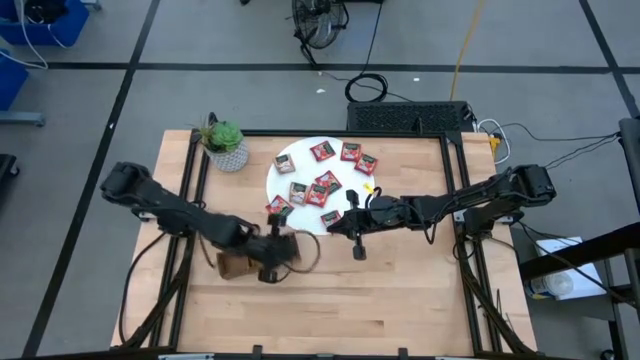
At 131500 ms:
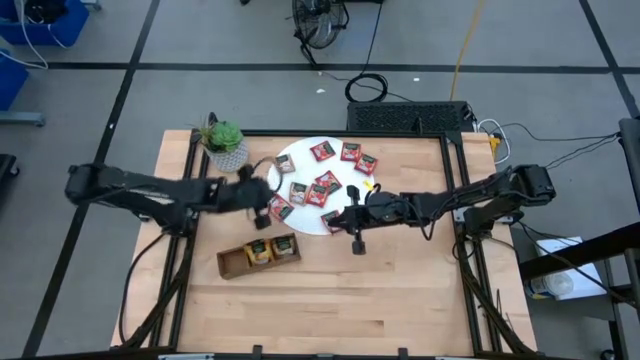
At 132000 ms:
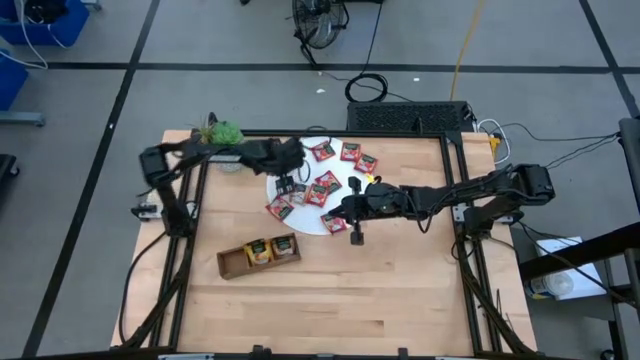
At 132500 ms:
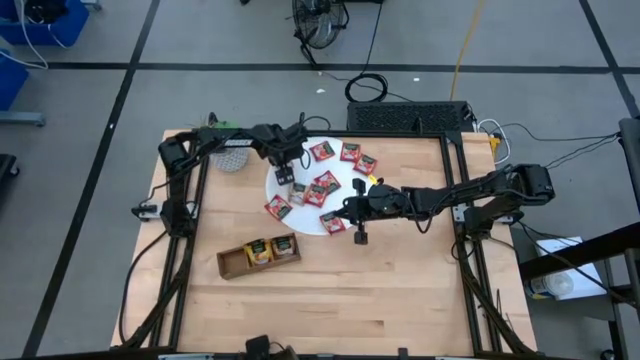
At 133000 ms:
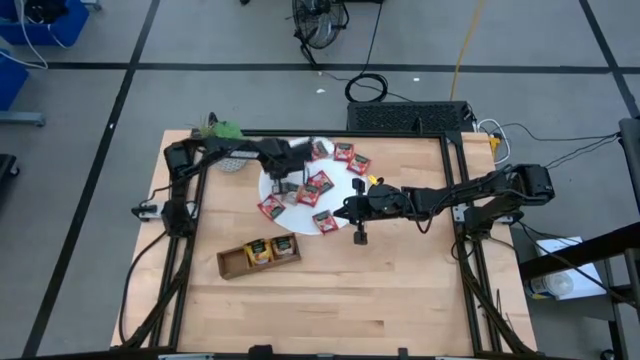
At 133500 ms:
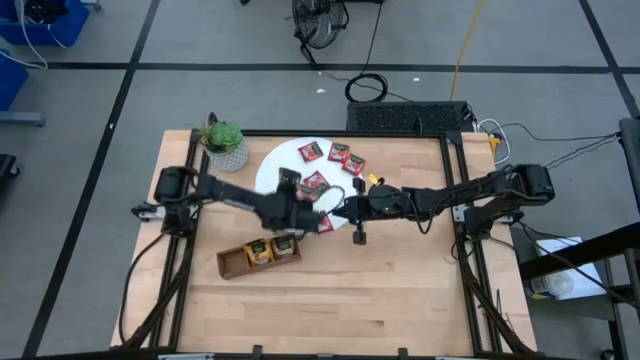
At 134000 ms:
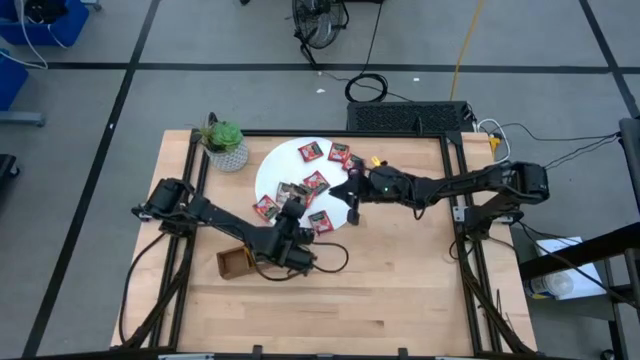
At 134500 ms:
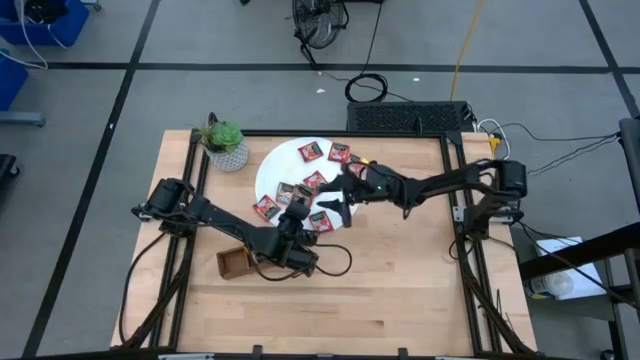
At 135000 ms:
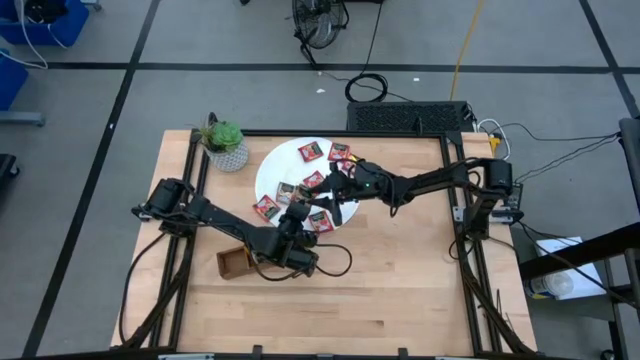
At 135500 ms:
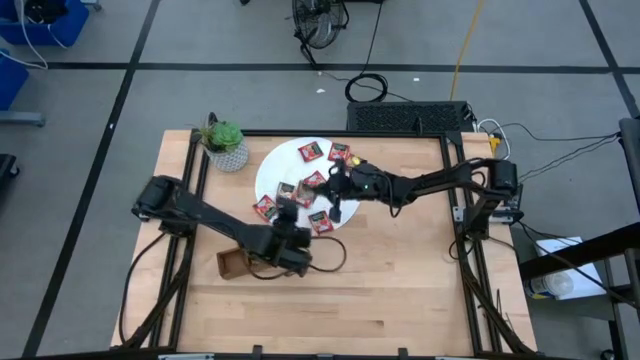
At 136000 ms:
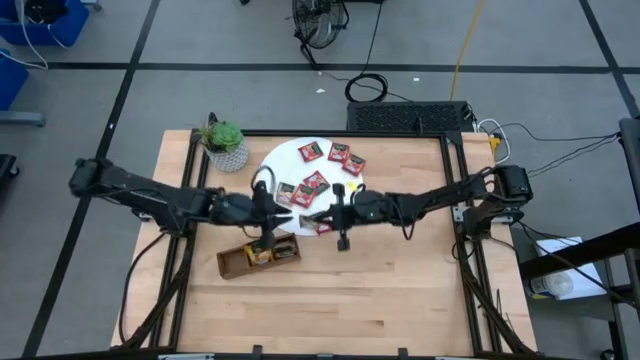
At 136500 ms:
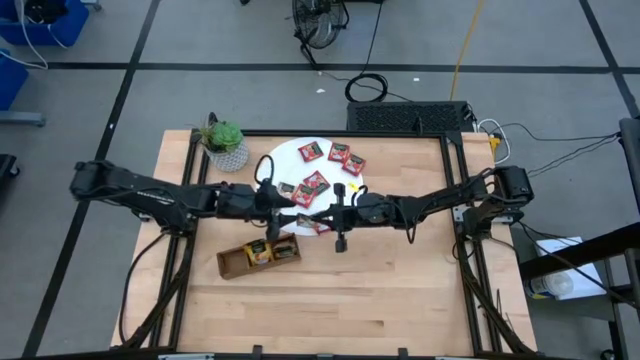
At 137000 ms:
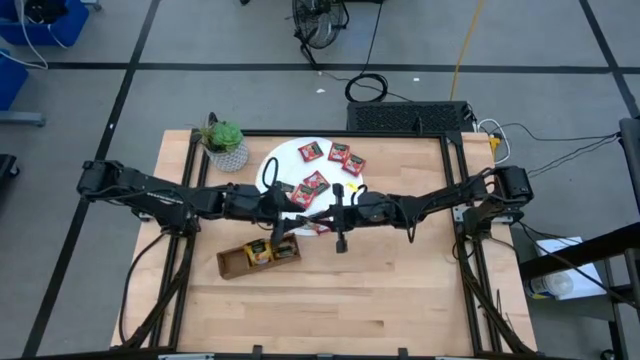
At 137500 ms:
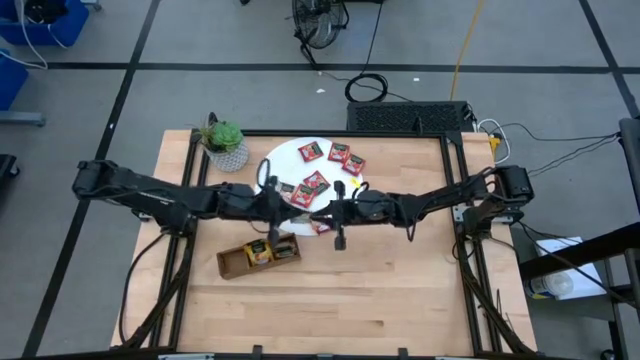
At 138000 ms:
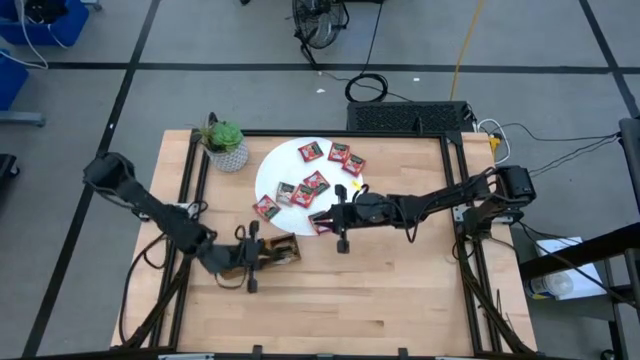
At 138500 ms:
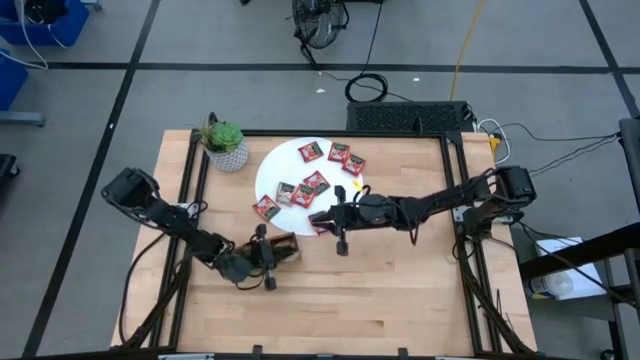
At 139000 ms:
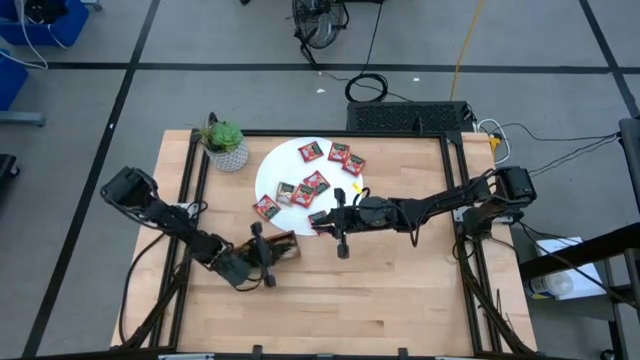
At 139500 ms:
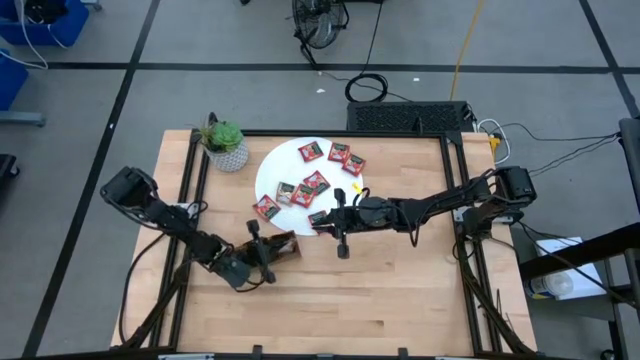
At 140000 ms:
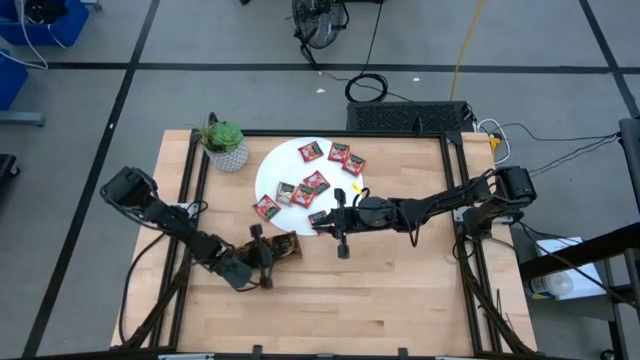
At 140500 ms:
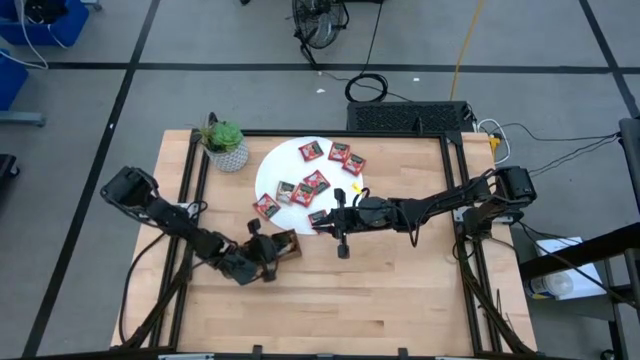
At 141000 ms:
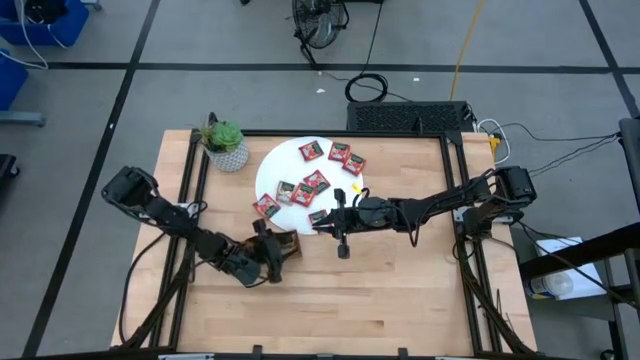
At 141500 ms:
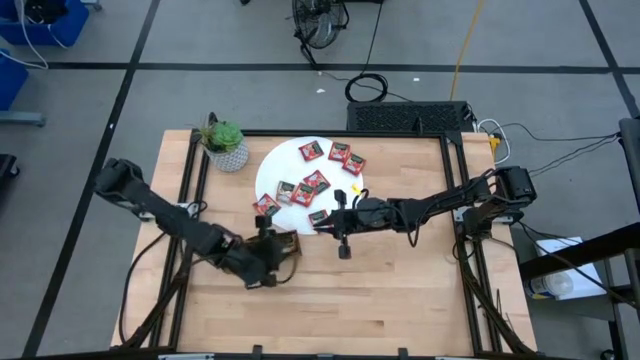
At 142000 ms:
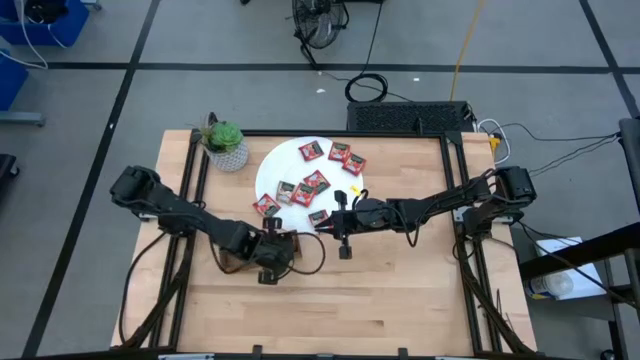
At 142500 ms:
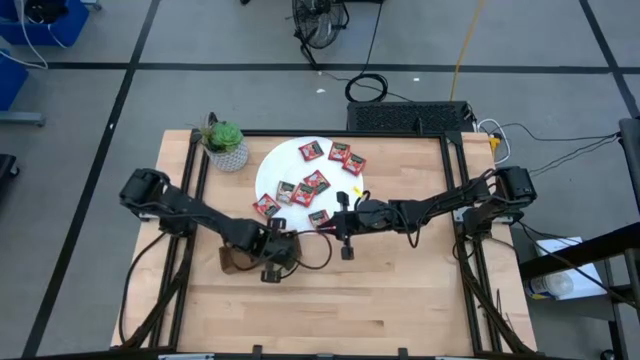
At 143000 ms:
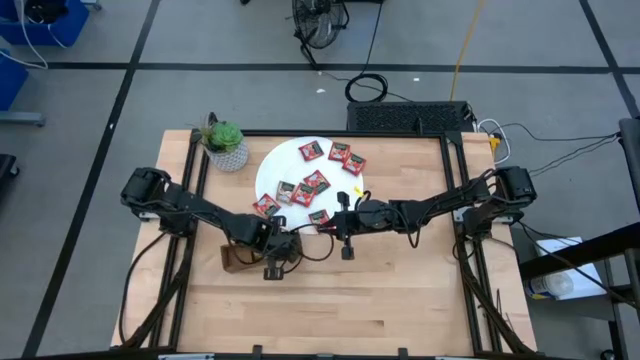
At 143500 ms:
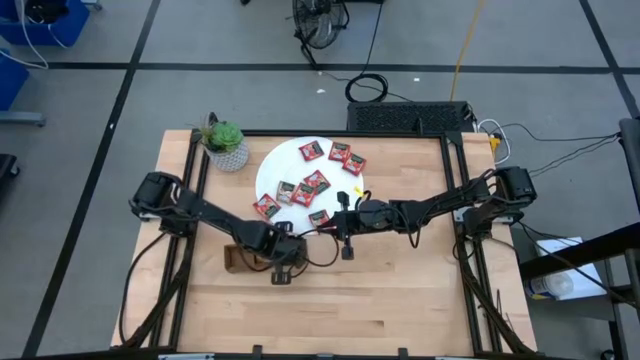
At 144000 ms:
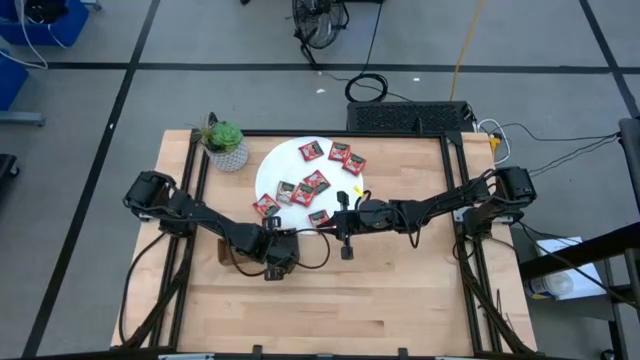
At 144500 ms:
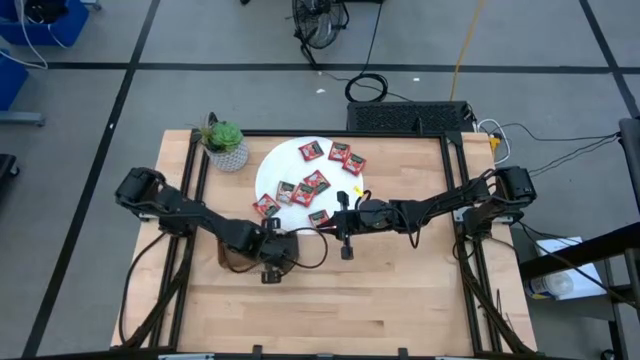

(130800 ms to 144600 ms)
Task: Pick & Place Tea
Put the brown tea bag into the right section of the wooden organizer

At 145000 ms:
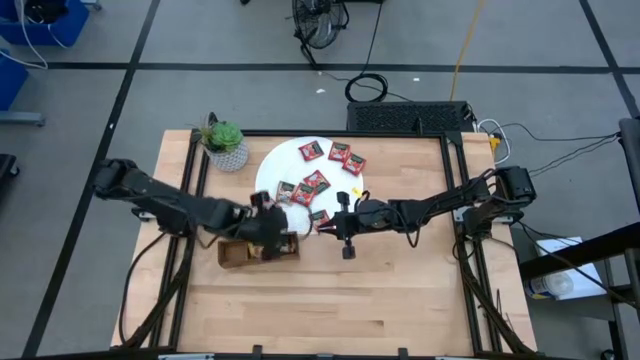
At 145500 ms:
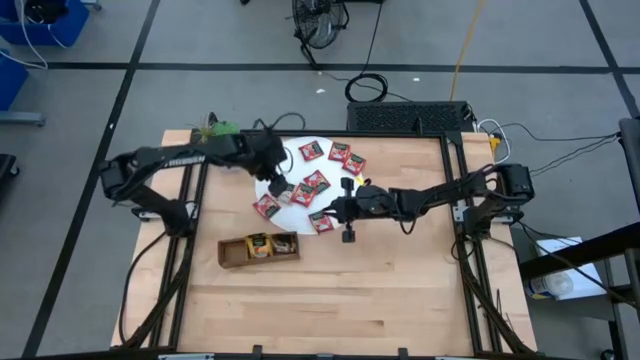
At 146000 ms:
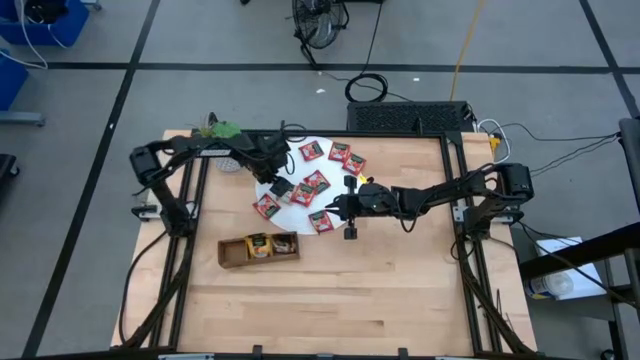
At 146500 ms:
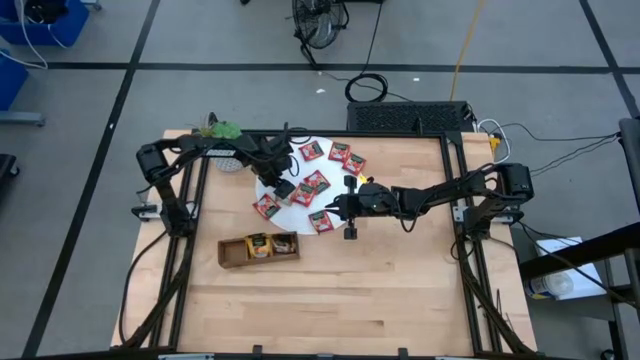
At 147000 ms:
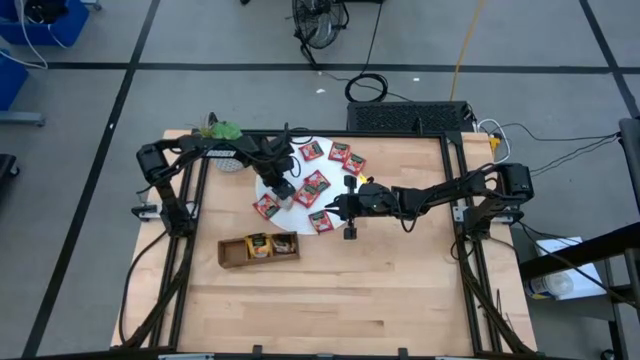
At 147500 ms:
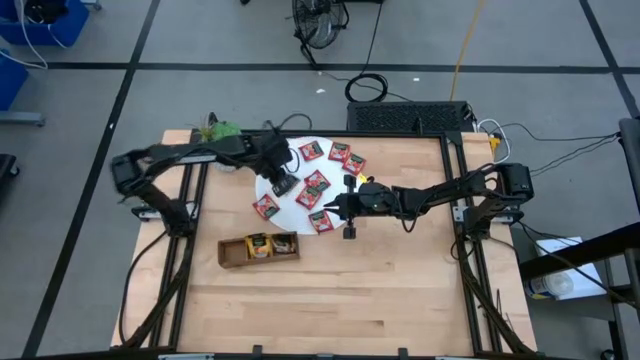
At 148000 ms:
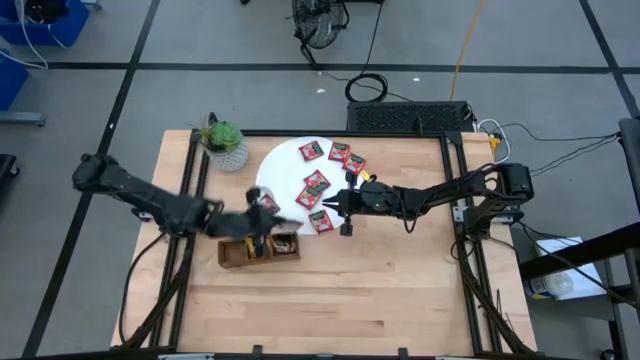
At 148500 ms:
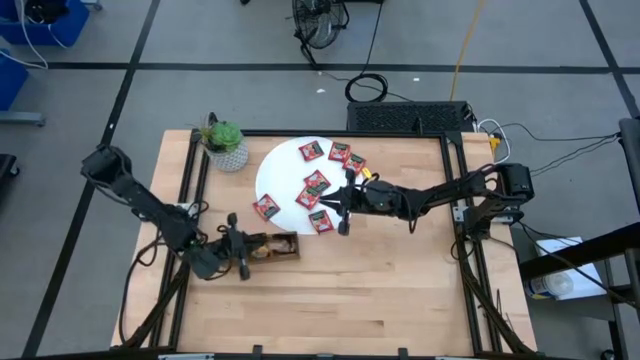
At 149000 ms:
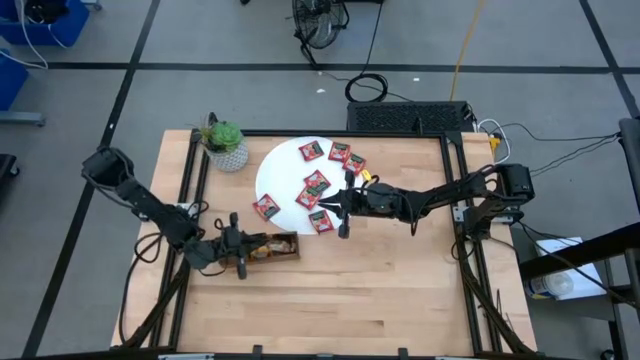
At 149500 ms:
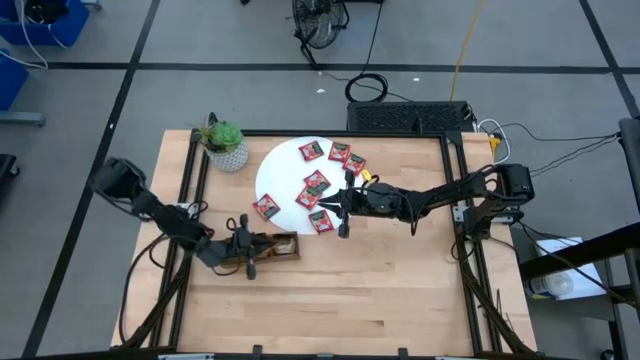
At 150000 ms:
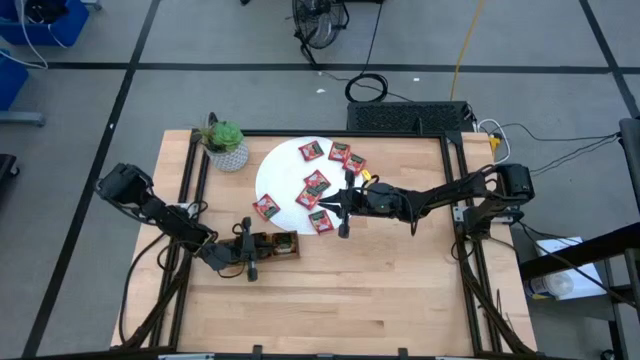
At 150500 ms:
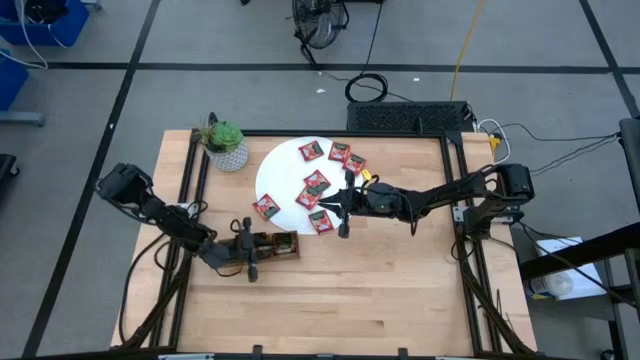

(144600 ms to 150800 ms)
Put the brown tea bag into the right section of the wooden organizer
